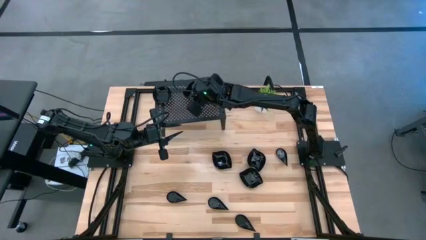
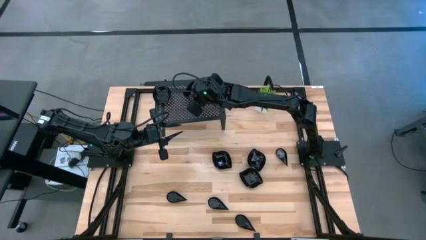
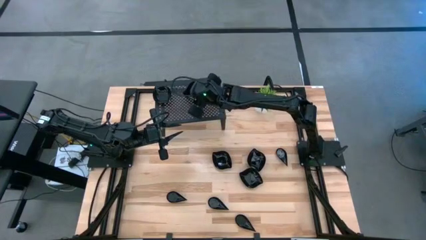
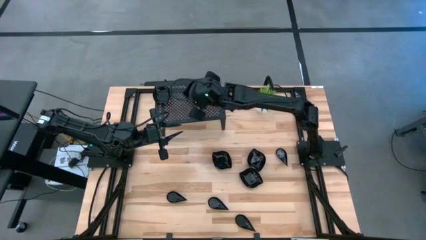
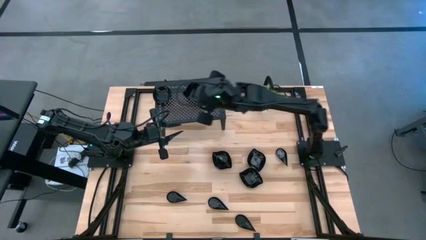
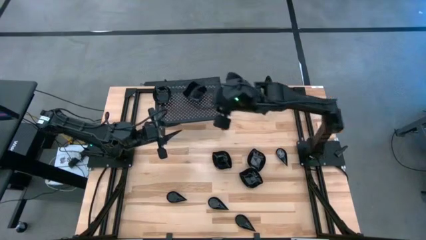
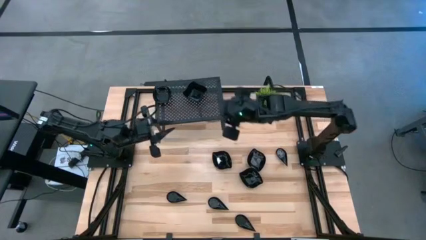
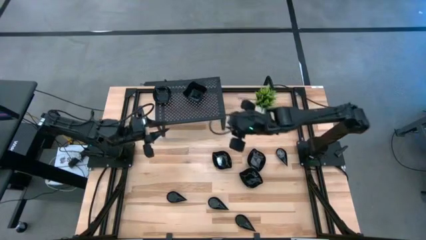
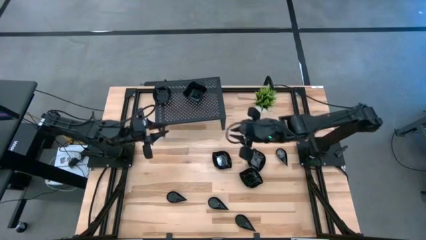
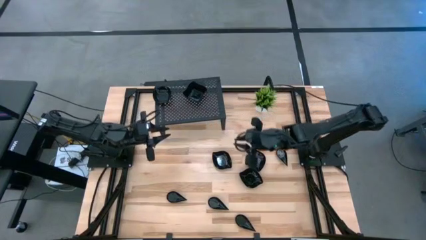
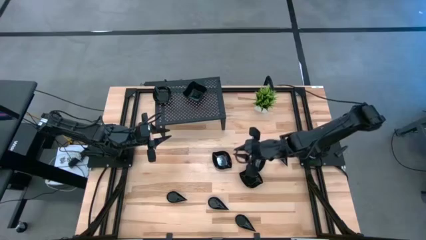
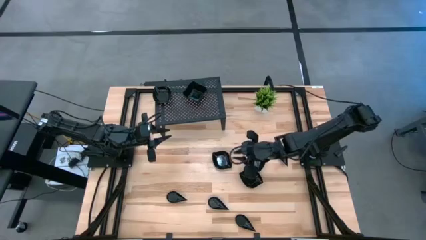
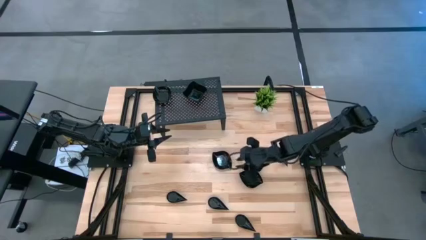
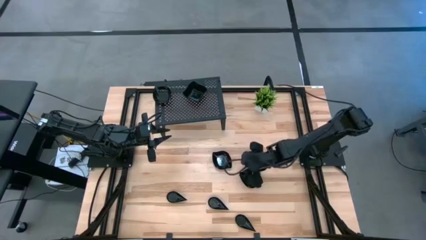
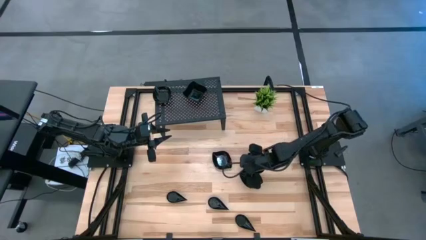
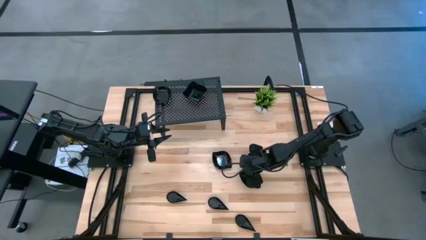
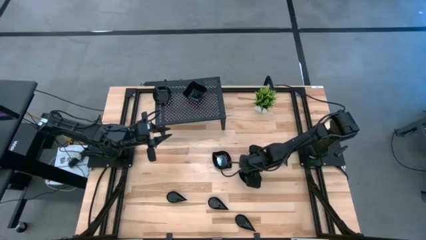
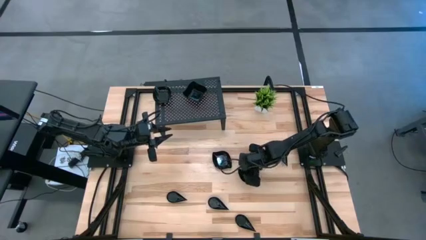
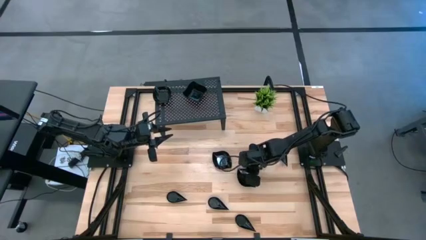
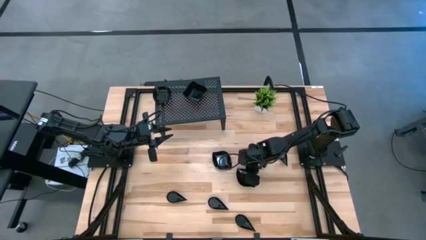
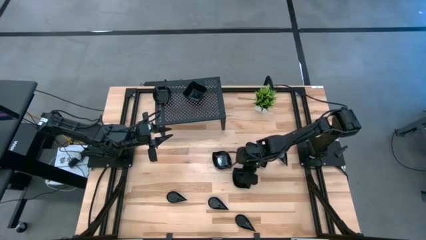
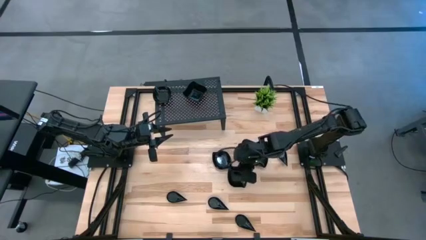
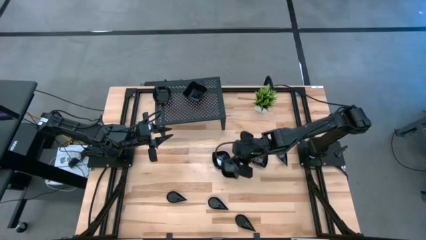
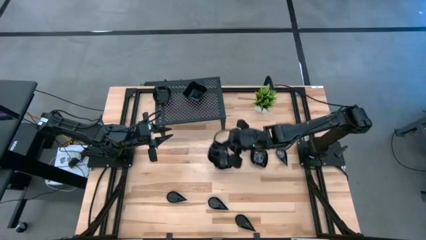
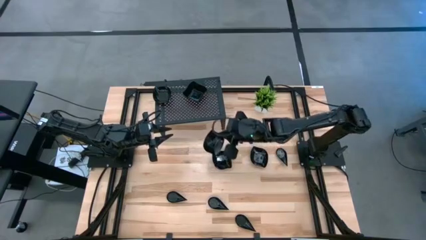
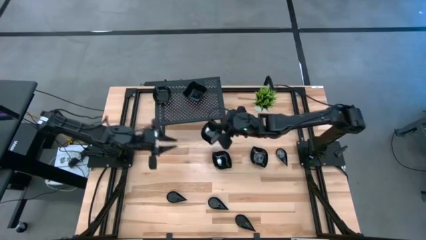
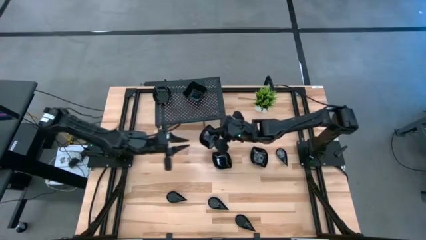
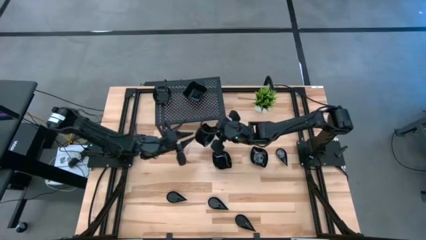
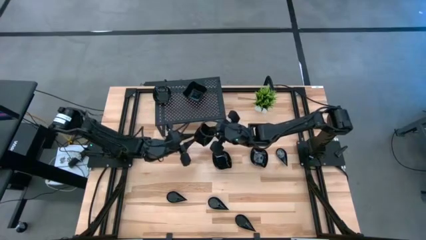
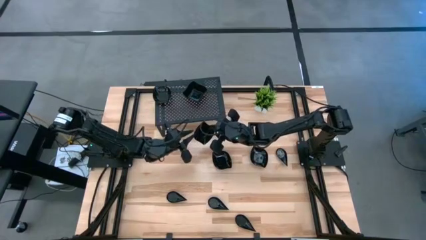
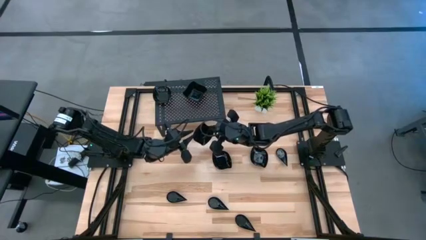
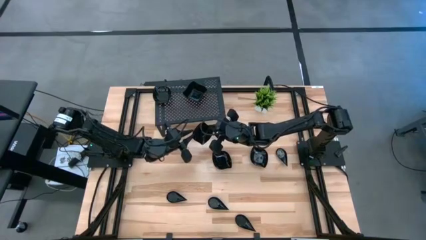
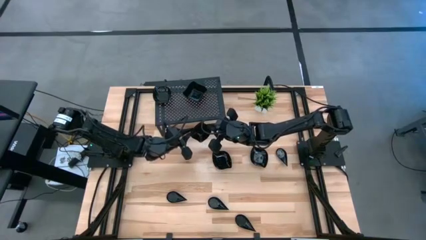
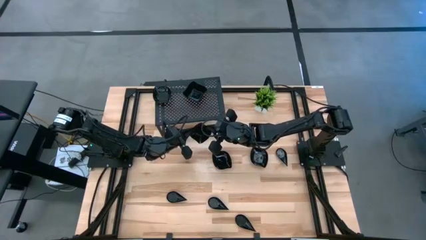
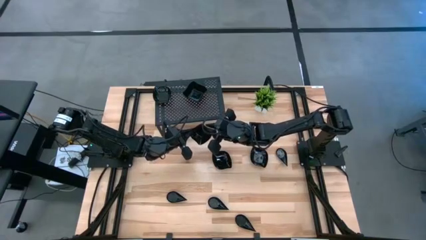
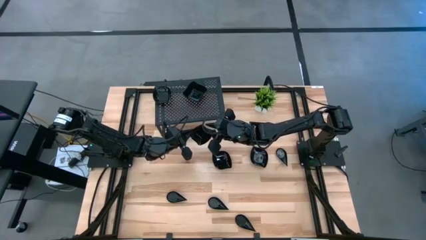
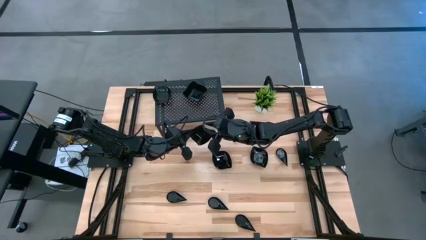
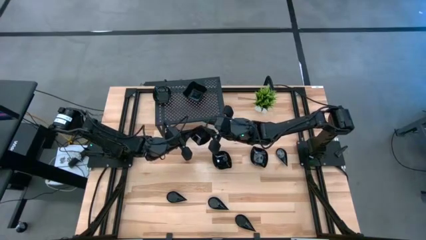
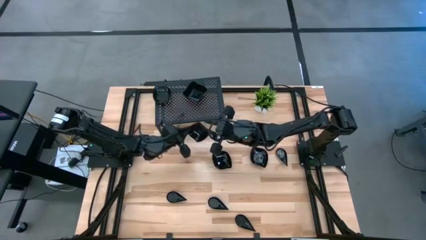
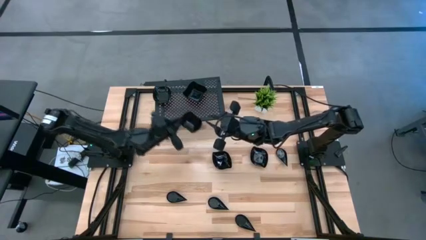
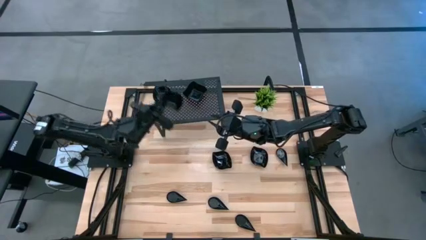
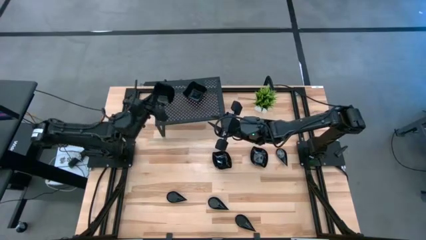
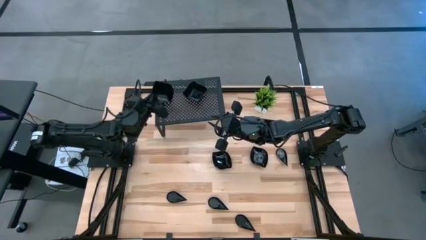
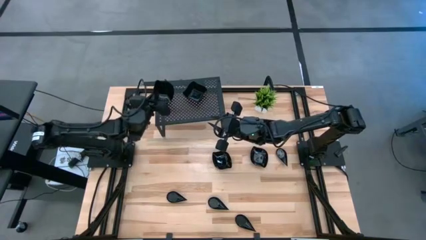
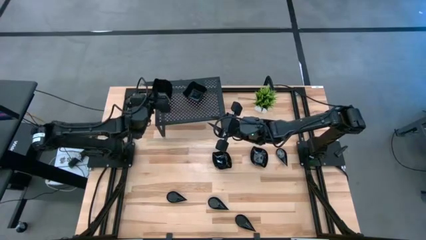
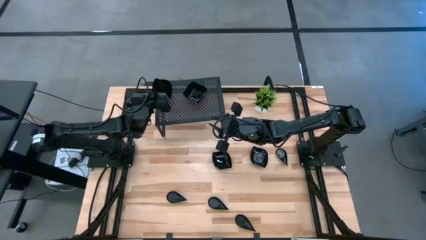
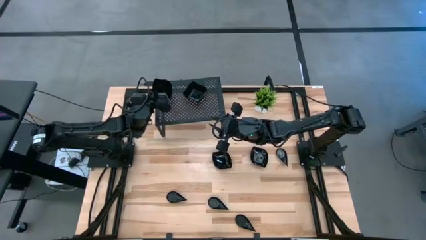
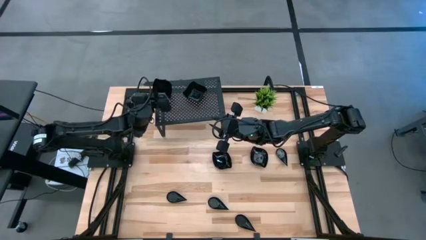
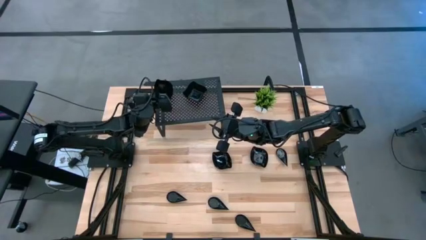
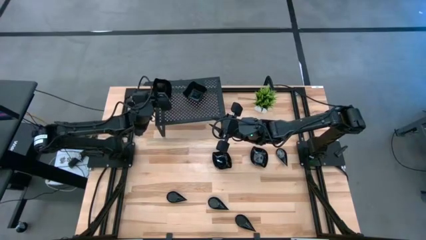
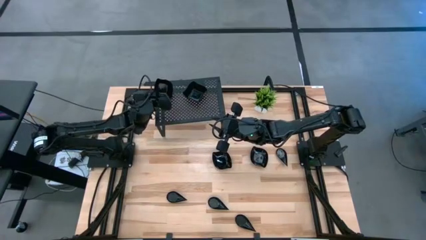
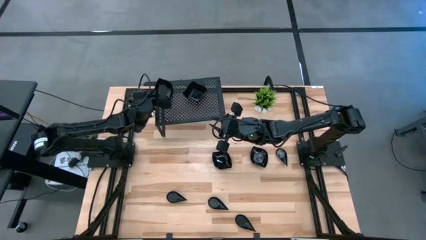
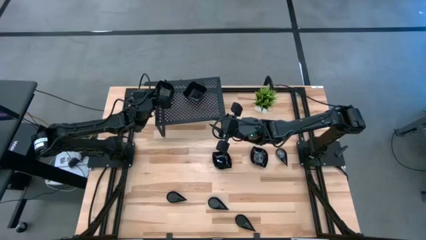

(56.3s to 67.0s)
Task: Pick & Place Mini shaped plates
Stack the black leaf shaped plate on top of the black leaf shaped plates on the shelf
